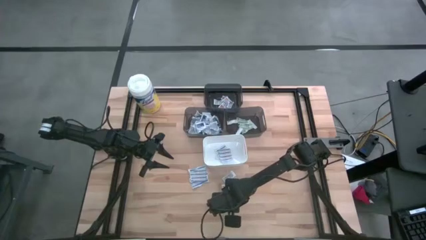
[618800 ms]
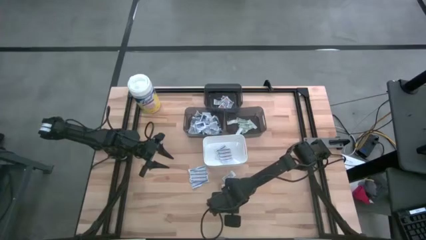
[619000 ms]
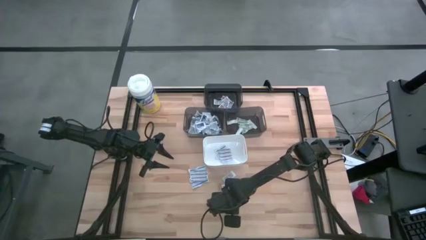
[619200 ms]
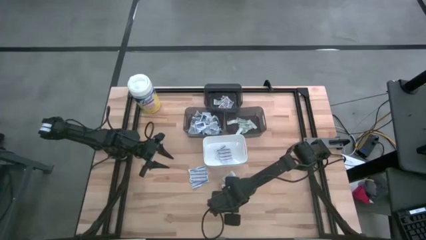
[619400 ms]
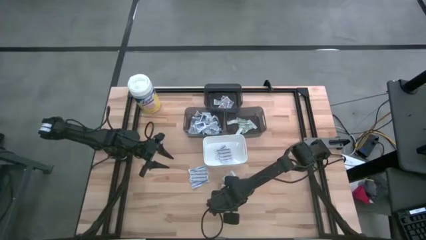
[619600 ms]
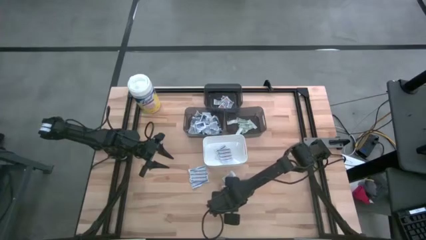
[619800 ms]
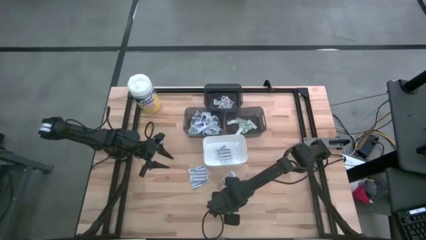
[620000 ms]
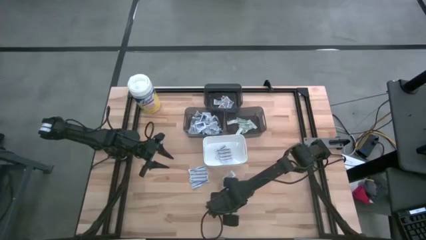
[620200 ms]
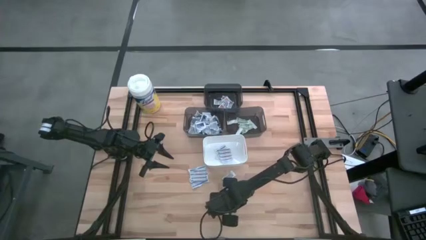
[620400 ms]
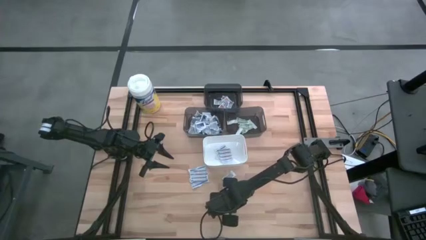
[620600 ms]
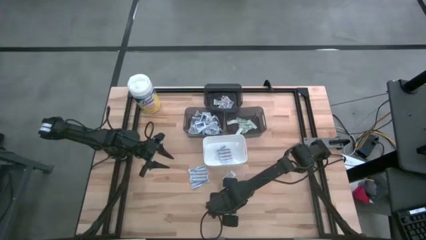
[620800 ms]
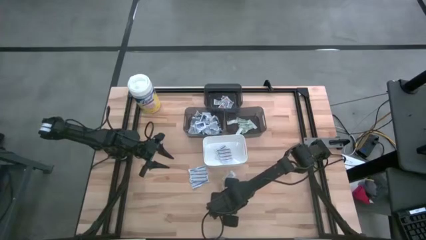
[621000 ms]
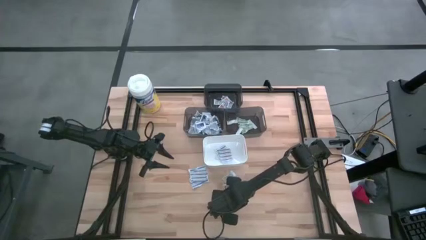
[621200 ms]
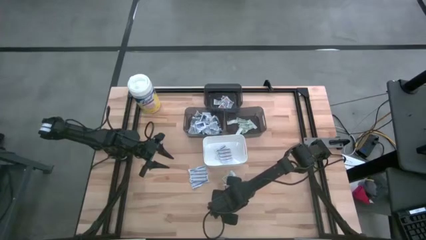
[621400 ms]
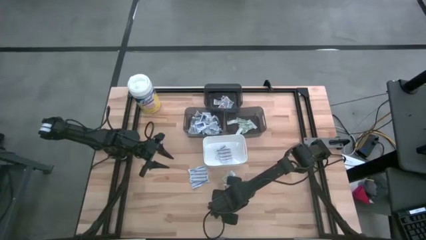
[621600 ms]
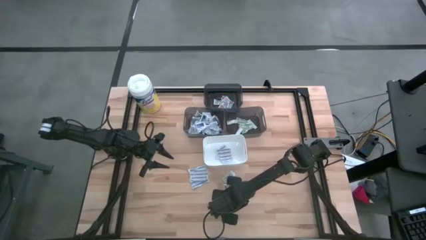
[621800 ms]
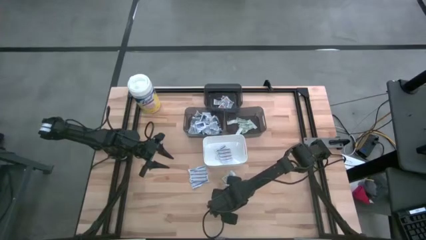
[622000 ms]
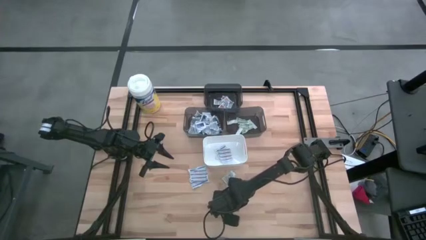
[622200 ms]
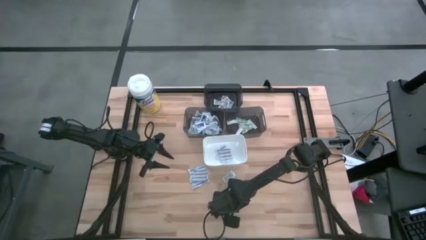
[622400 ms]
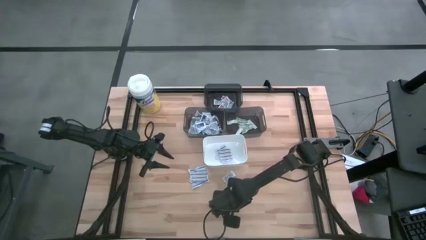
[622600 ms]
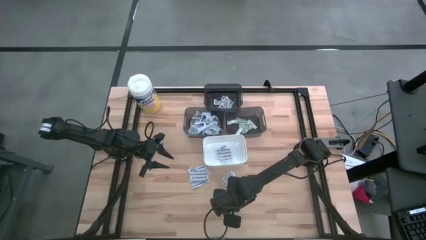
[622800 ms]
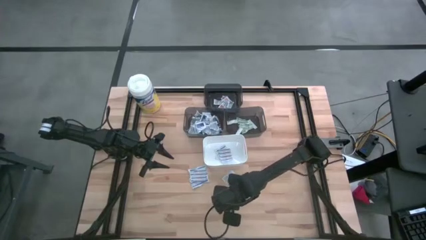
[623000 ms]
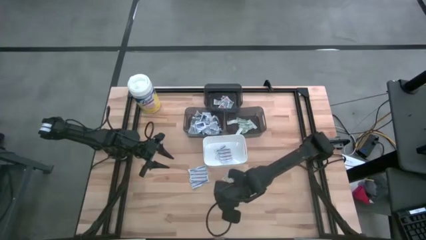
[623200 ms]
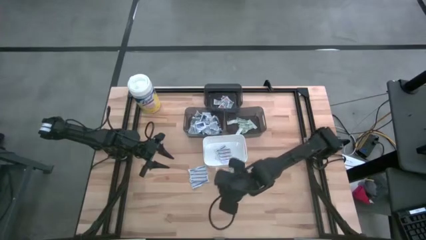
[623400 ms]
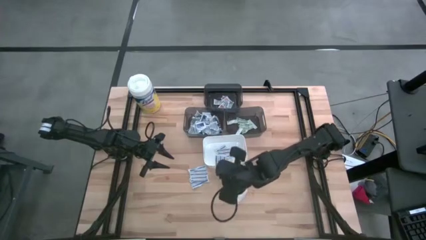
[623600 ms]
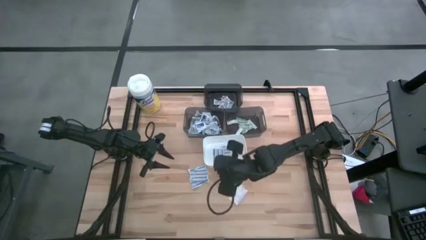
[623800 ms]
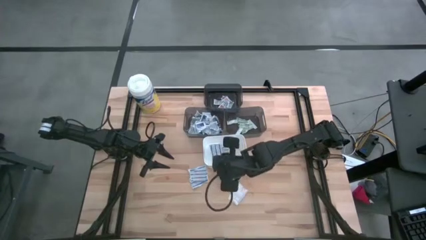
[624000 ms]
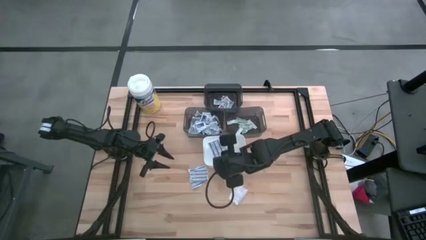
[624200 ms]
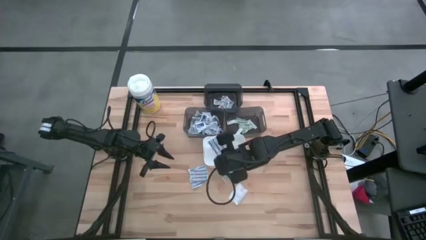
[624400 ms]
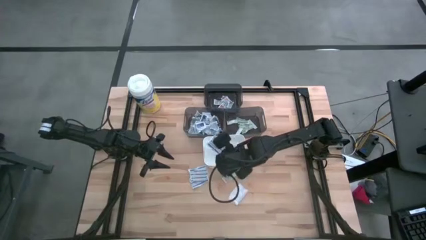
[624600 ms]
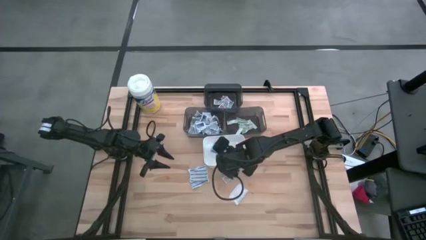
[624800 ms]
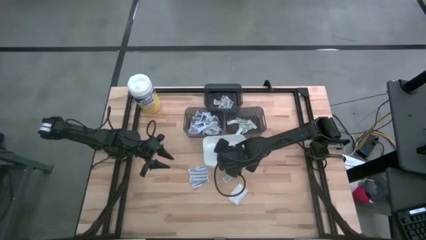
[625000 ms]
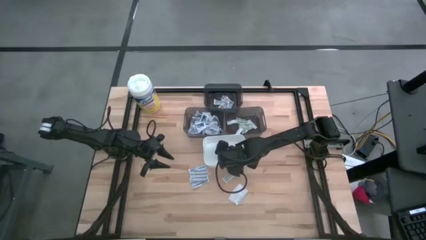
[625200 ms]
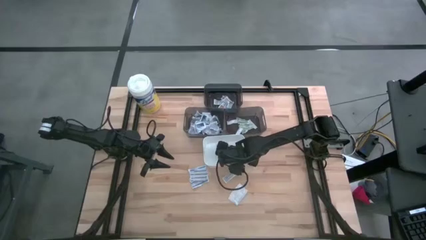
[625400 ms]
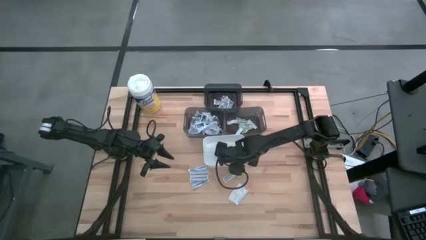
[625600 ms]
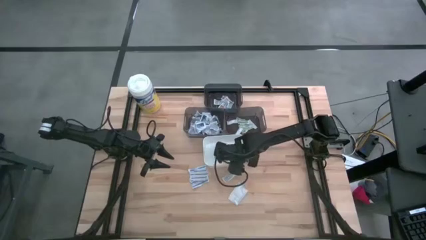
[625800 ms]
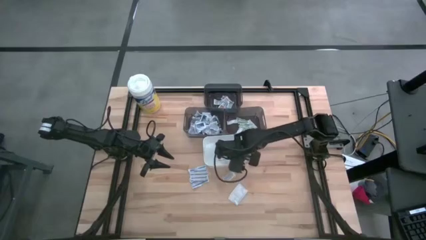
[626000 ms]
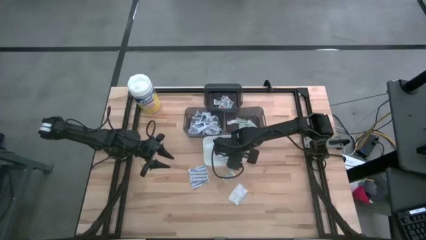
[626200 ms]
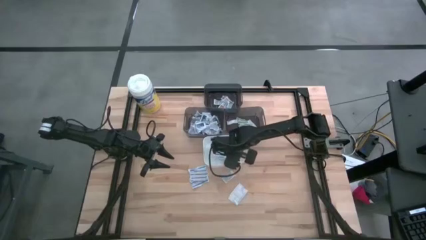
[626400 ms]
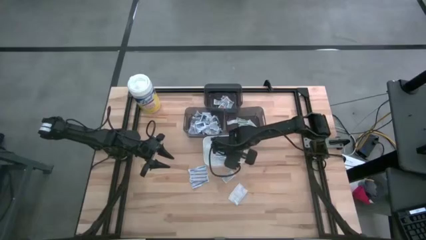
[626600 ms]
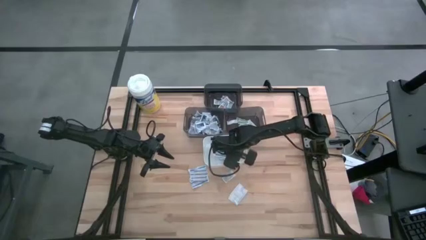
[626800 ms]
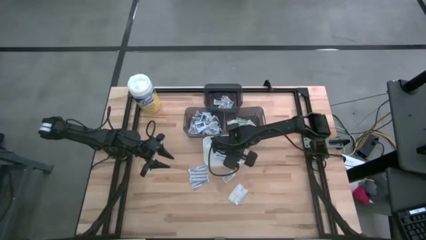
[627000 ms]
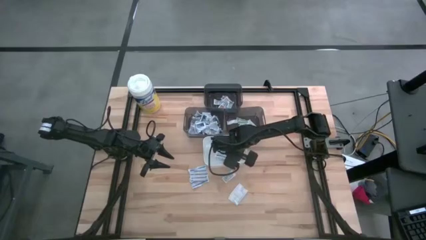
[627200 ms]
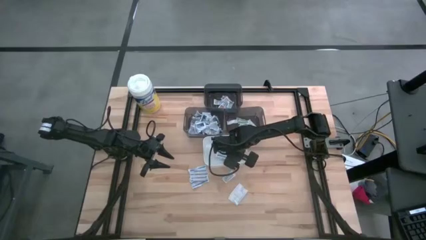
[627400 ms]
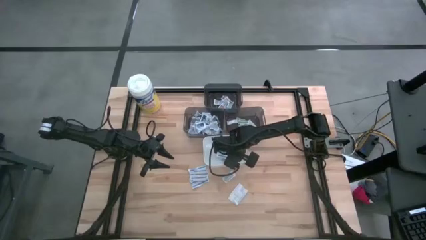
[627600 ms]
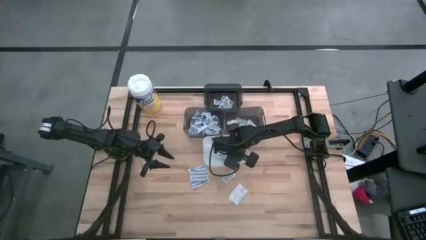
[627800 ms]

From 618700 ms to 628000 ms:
Task: Pick & Place First Aid Supplies
Put the blue bandage into the white bin

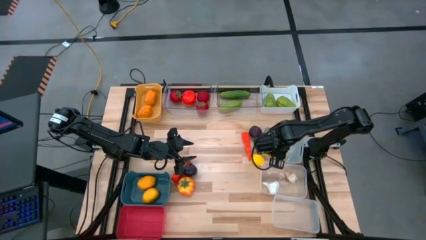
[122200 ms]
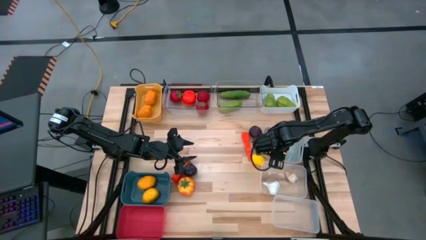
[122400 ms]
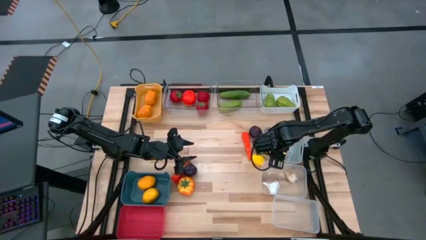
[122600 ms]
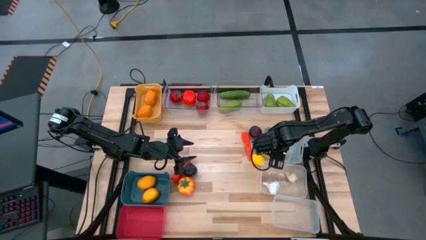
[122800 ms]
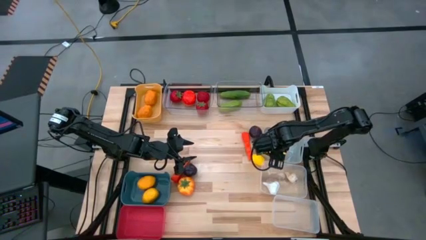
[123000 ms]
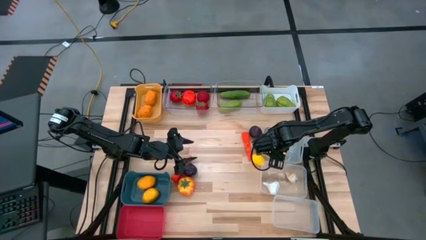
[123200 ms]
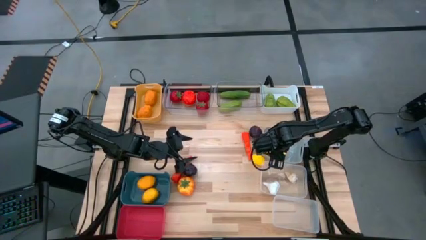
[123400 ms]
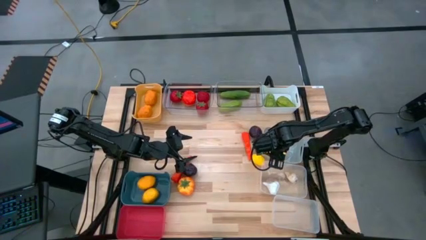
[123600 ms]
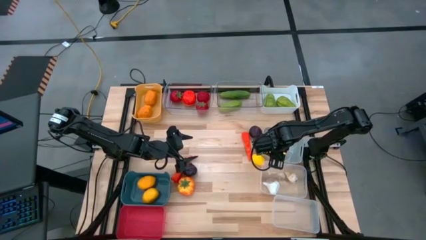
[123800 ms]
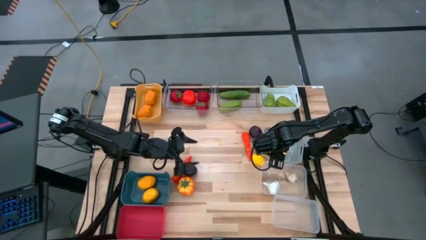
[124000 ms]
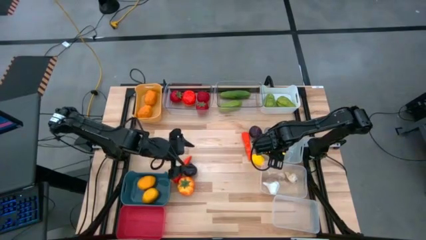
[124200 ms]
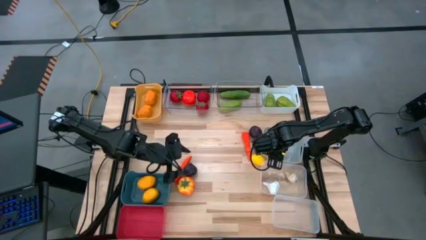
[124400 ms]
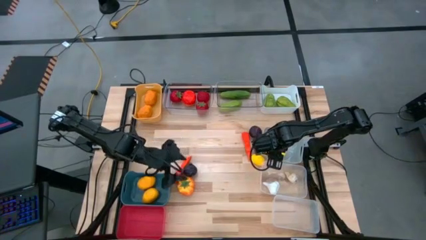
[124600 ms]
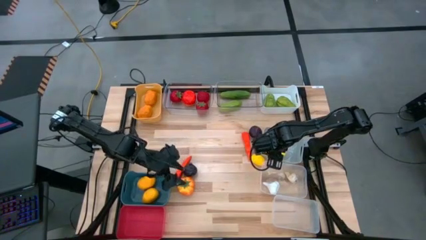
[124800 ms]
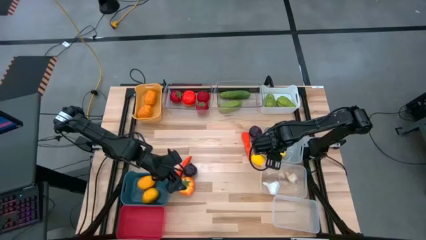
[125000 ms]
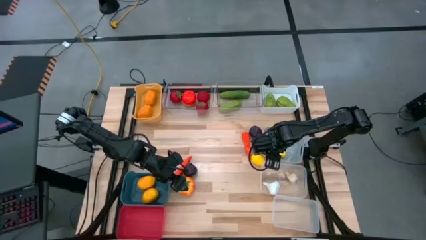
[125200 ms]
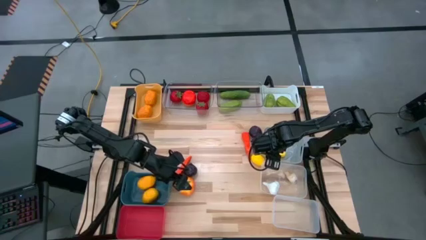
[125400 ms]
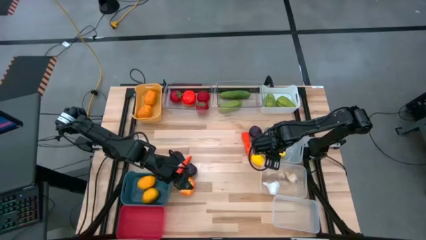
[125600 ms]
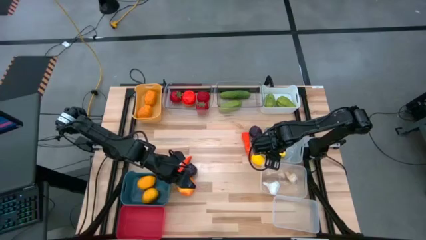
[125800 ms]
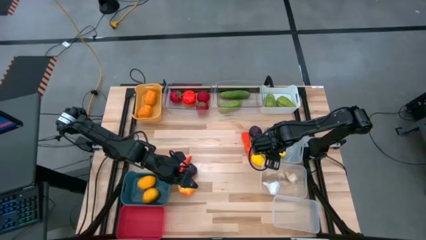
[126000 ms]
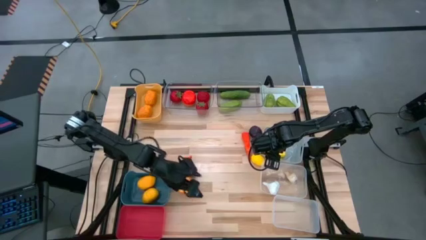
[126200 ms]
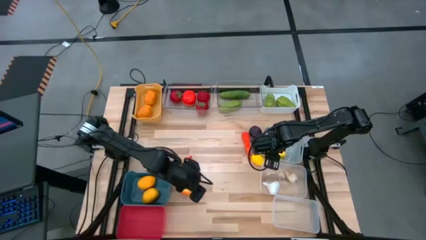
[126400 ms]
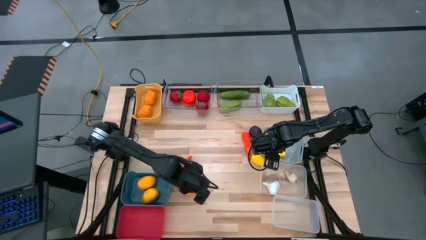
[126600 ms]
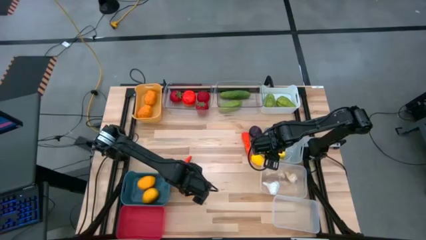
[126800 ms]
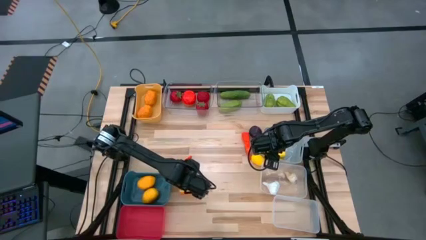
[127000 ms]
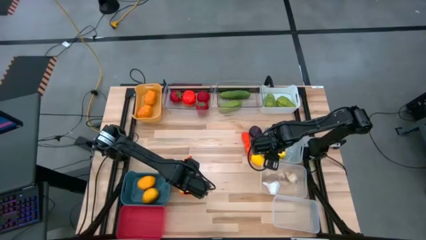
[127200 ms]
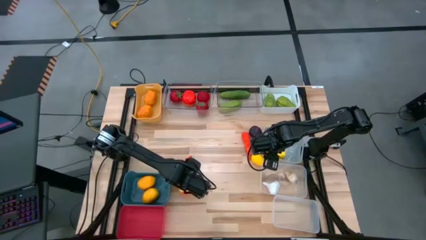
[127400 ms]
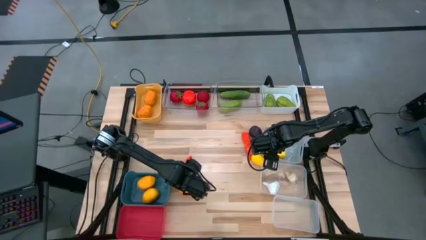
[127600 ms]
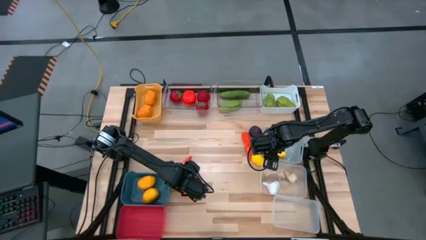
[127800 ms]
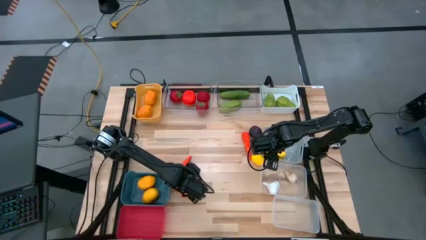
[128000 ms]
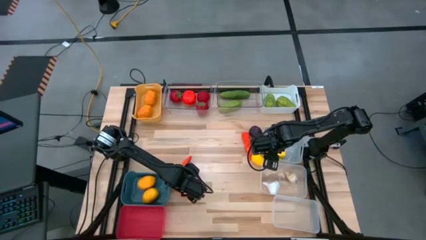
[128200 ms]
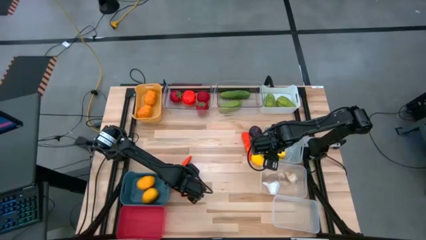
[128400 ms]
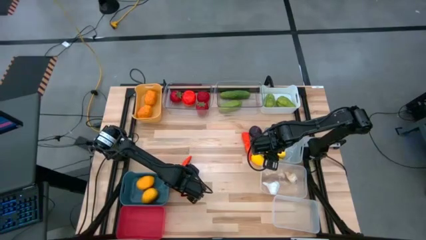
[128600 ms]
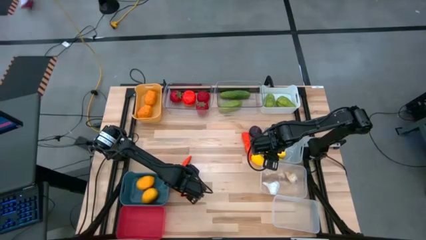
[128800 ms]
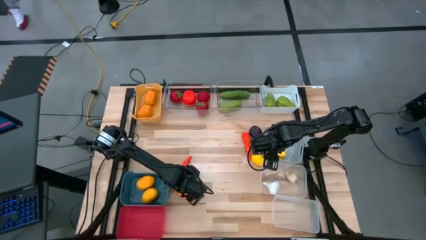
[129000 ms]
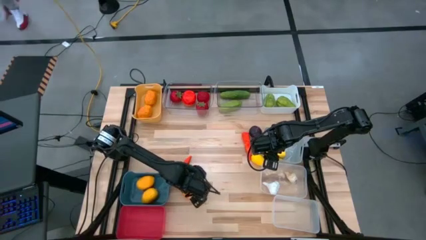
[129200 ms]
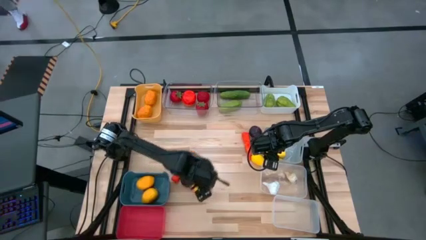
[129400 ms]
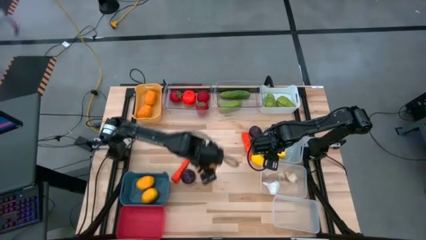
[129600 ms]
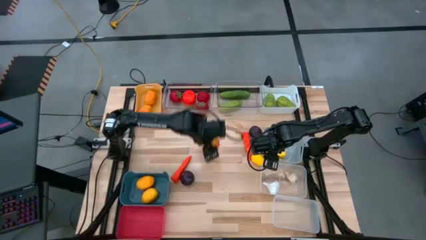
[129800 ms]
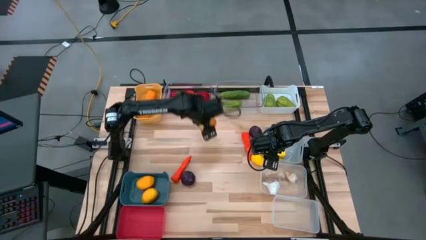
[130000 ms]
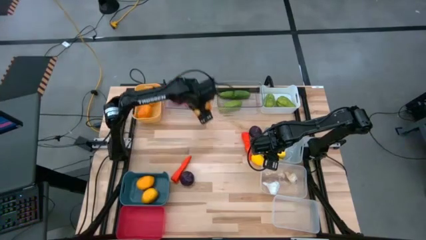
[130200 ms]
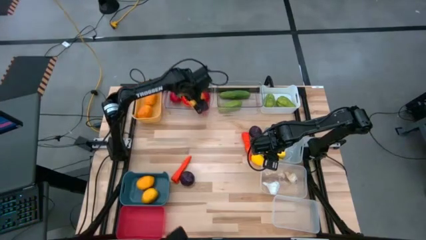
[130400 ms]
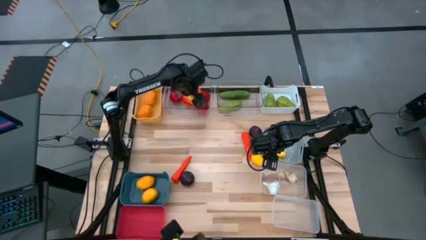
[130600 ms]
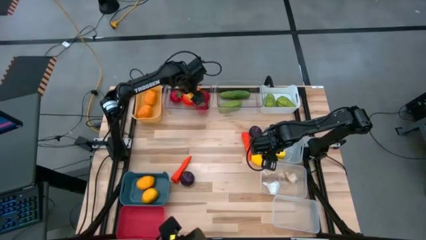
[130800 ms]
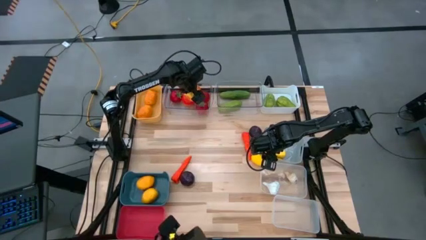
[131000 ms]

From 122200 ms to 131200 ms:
Task: Sort produce into baskets
Put the orange tomato into the left transparent bin
